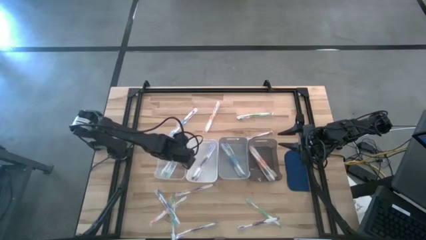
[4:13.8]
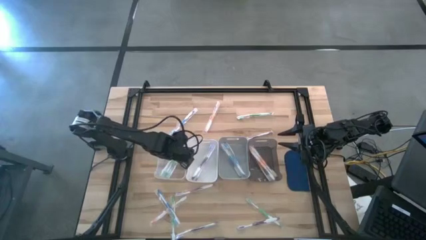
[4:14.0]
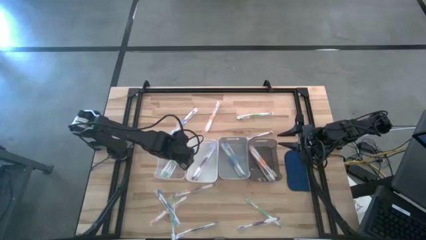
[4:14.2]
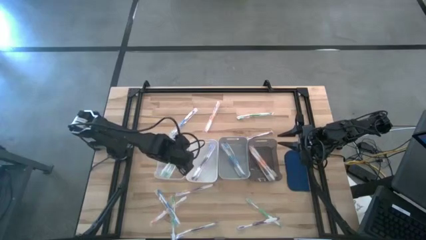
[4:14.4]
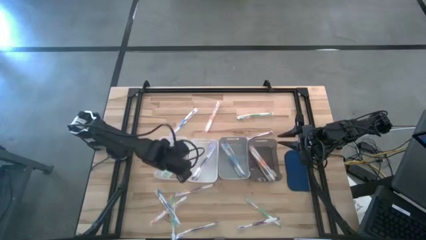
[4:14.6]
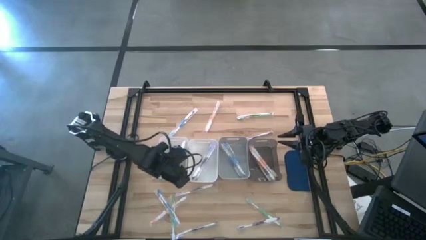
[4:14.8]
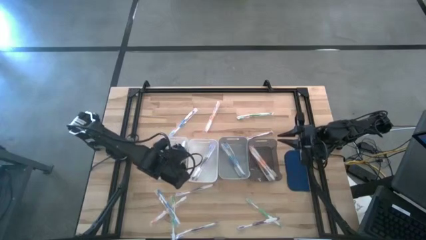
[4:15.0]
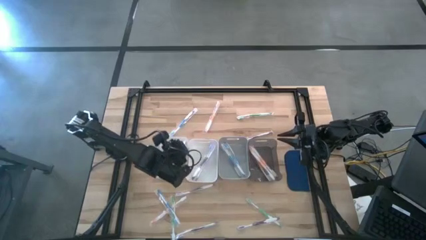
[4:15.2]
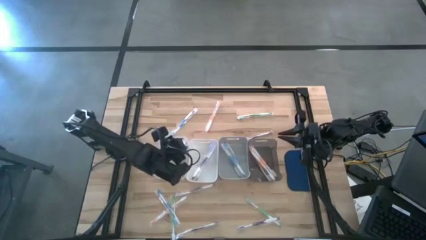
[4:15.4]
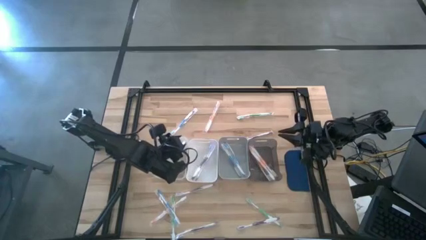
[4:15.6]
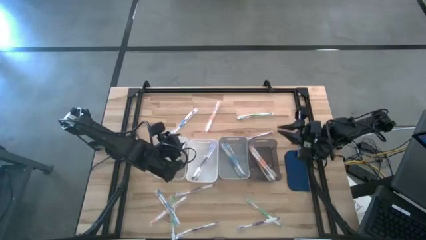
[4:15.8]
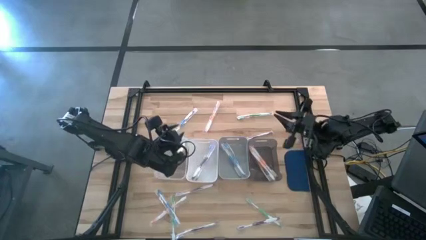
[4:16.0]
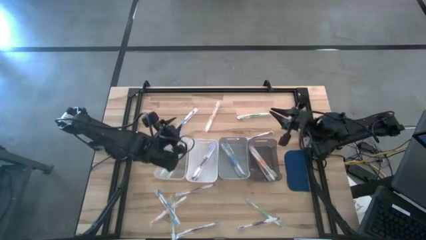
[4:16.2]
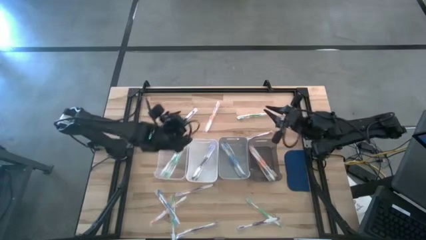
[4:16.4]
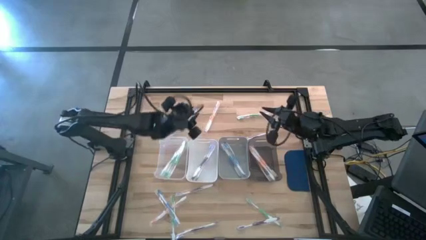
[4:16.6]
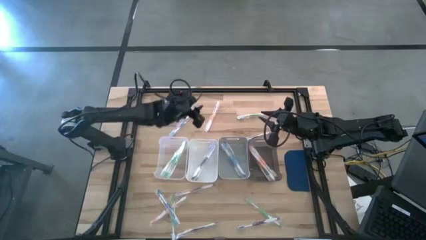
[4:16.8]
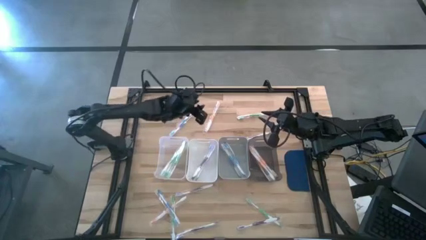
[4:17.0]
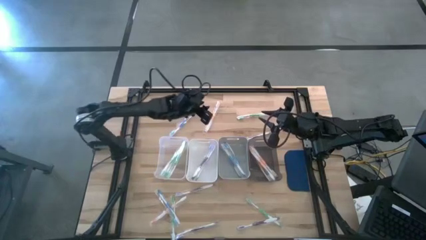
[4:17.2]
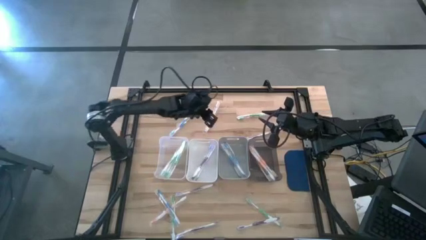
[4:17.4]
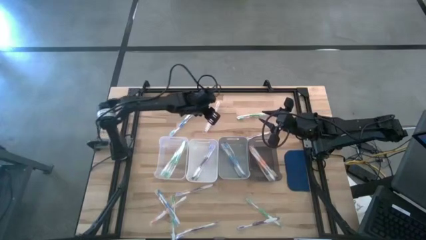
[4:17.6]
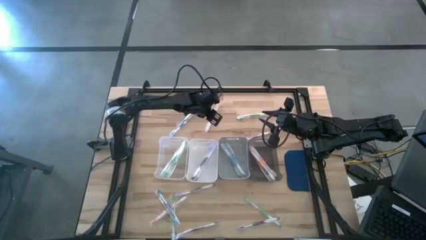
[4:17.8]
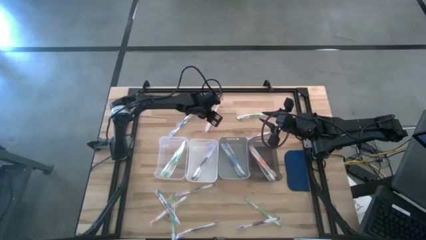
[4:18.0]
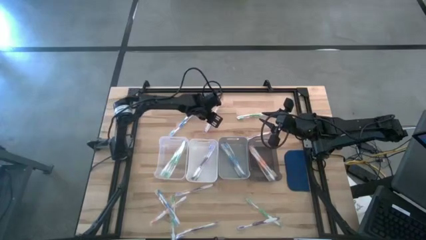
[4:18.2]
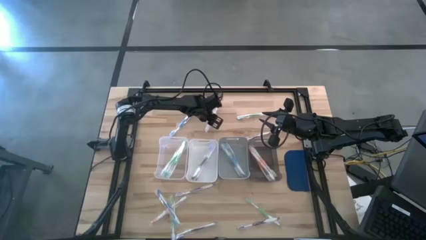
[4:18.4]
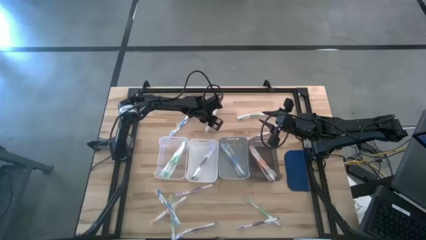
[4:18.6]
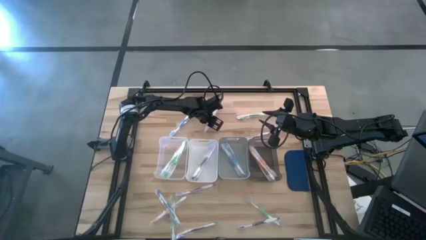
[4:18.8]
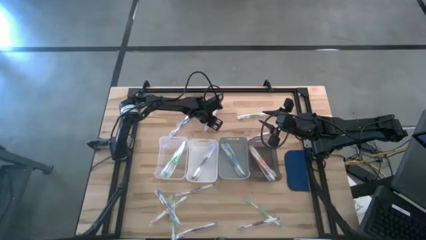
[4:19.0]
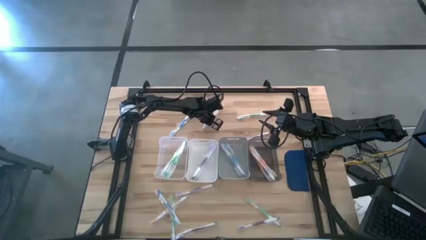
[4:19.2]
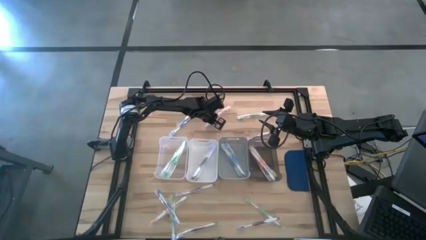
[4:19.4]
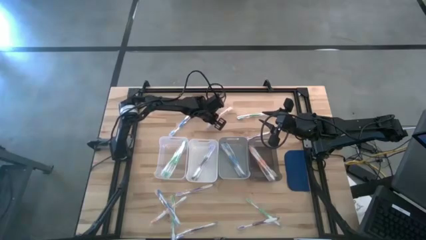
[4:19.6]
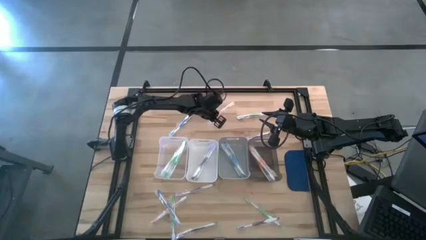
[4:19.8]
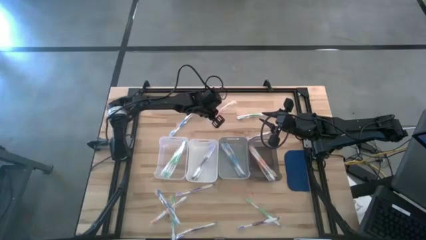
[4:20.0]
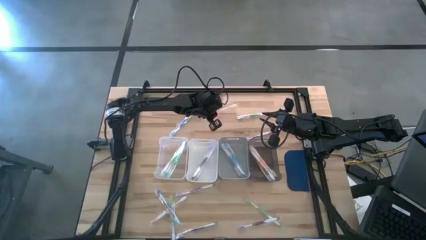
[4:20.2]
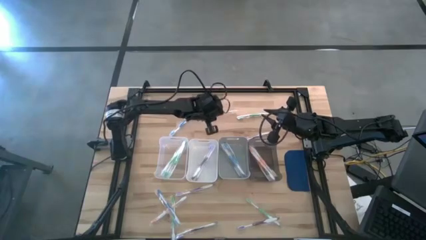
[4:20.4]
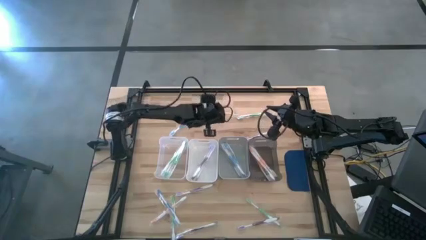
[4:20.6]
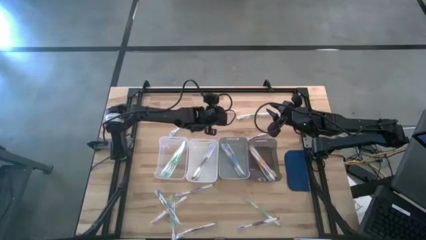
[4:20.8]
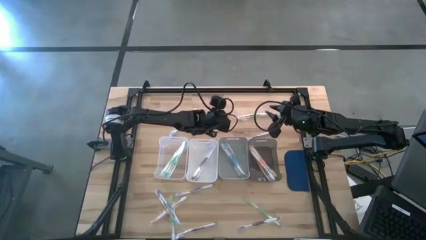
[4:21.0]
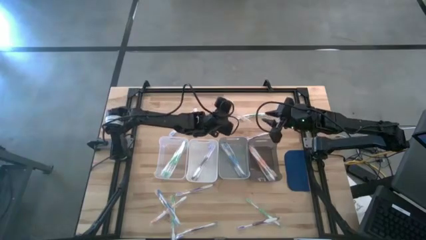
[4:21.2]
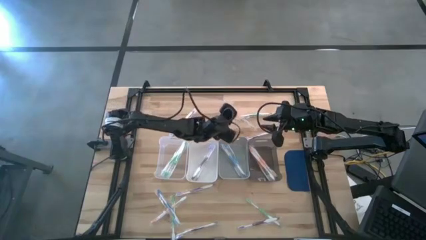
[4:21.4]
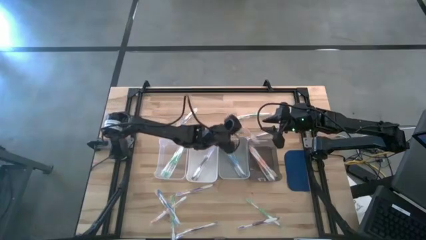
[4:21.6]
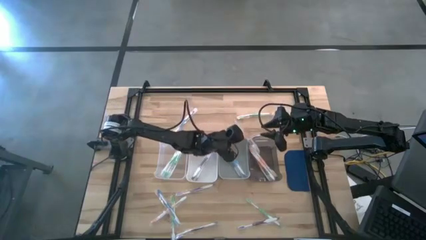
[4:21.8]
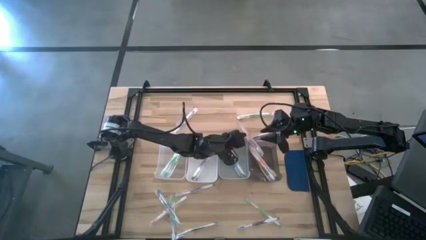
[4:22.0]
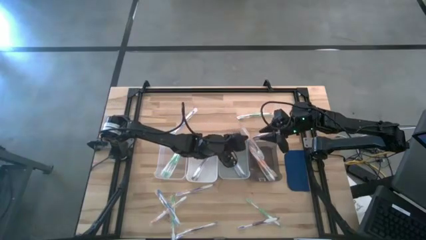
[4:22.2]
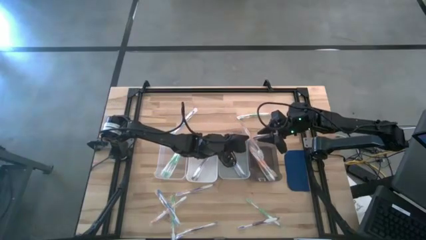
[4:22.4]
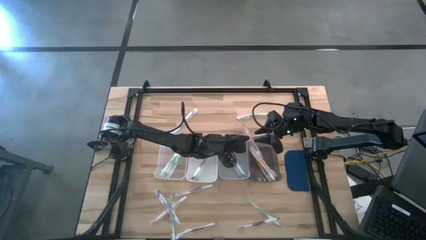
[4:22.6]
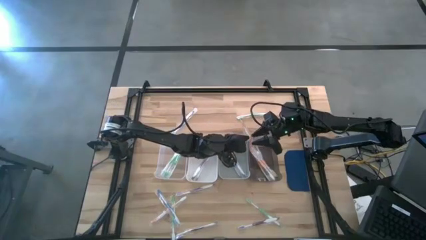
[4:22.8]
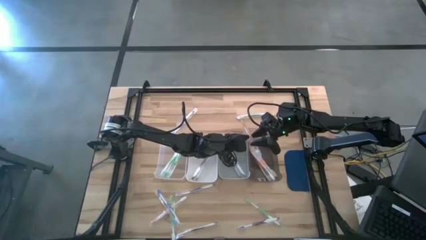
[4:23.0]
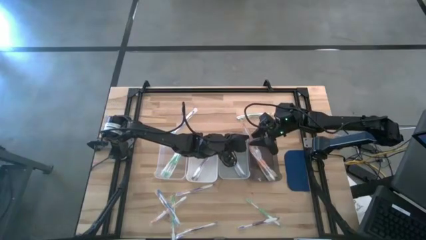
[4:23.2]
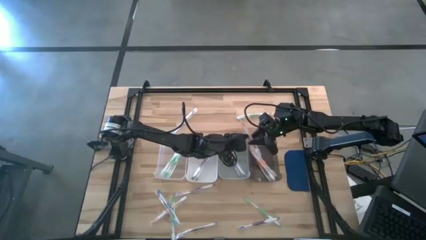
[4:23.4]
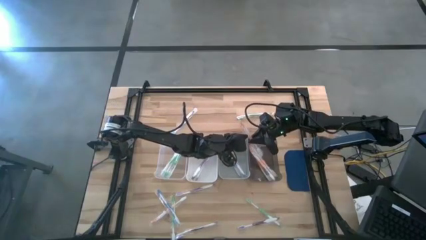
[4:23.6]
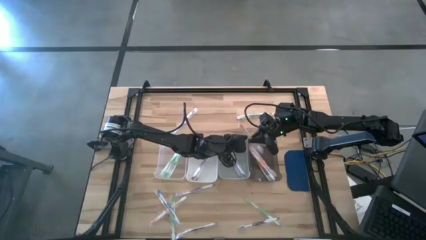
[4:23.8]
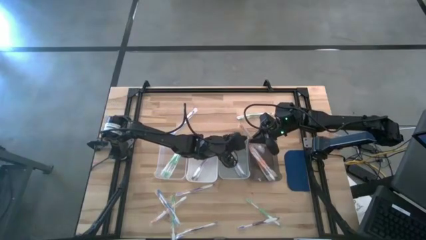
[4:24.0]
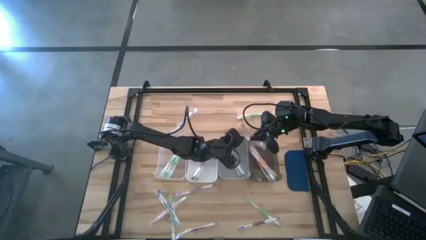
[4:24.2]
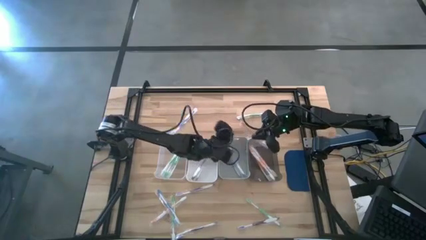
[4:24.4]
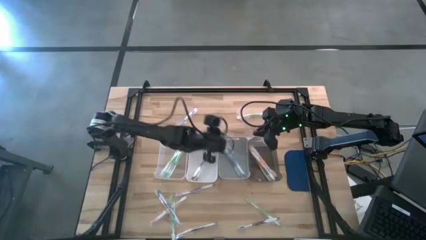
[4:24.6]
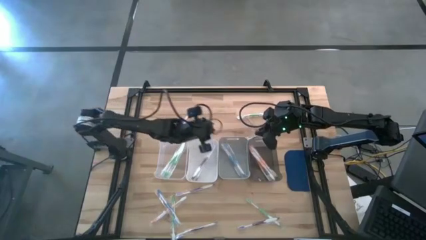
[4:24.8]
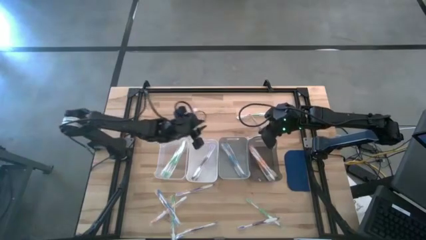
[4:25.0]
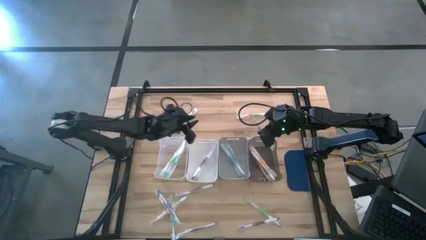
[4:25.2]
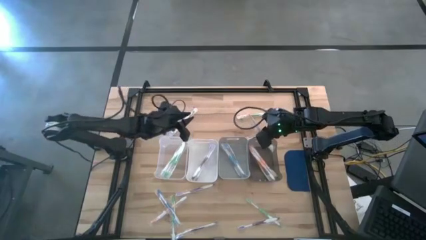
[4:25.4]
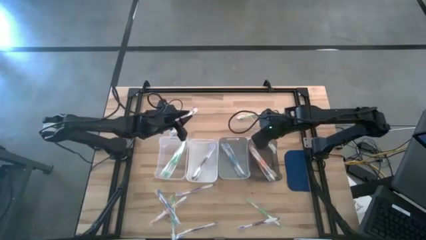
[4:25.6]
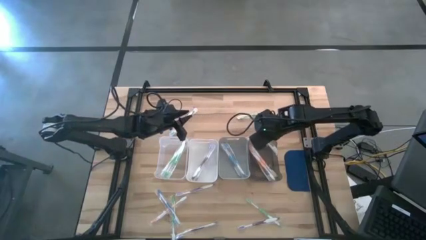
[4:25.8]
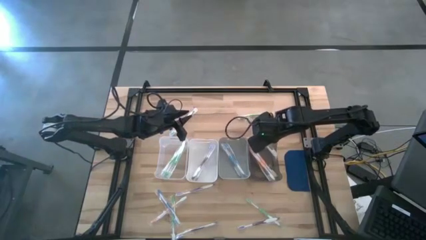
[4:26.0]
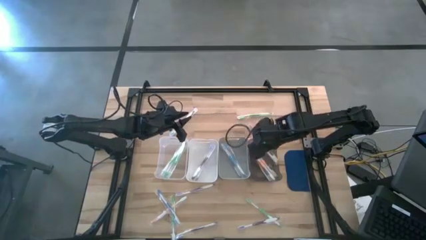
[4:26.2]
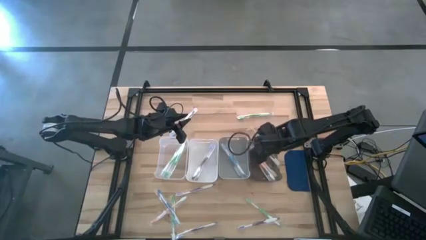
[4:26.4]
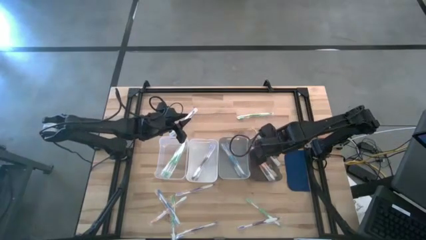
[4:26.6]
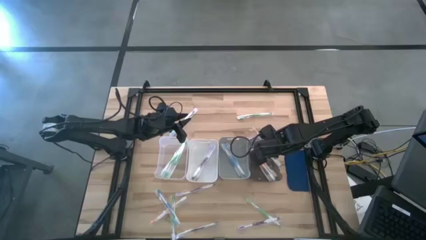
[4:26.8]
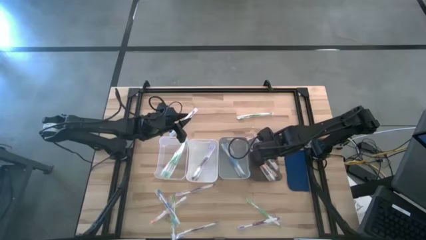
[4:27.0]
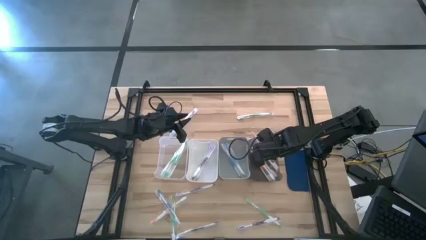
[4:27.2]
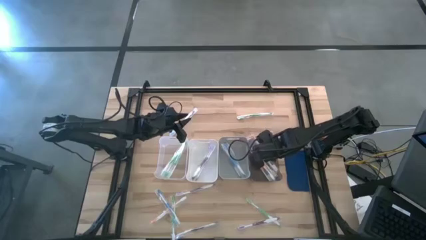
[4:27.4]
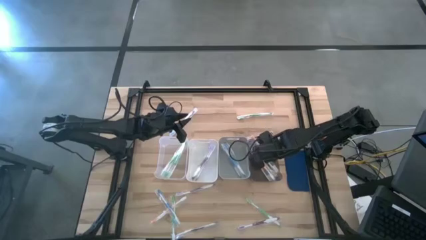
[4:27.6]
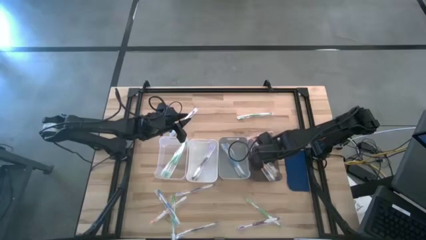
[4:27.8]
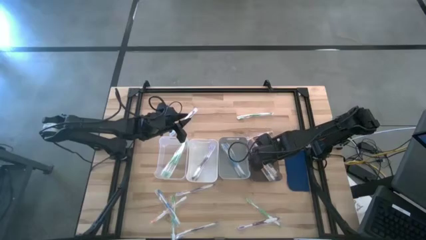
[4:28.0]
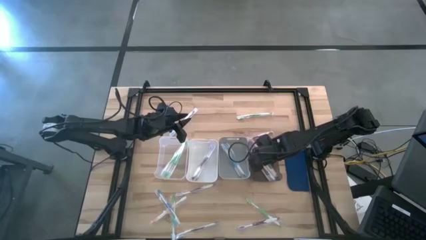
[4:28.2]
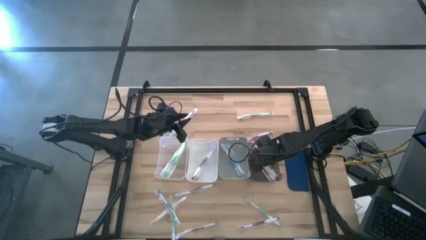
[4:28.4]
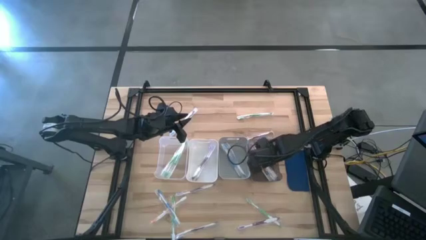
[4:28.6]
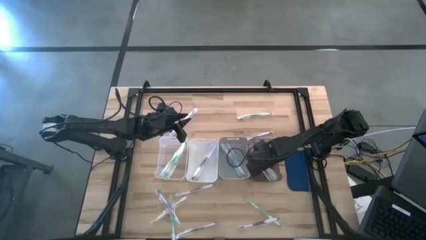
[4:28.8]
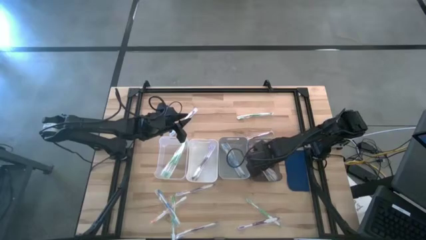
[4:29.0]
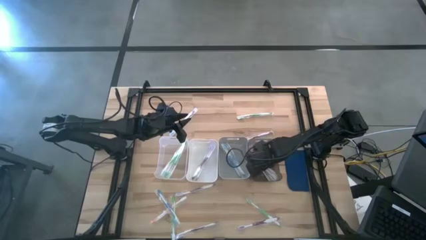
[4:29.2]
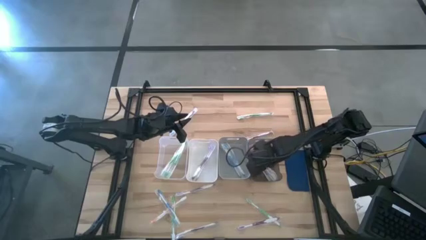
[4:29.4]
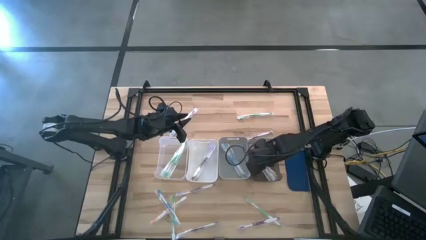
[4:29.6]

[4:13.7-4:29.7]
Task: Pick & Place Toothbrushes
Put the orange toothbrush into the black bin
